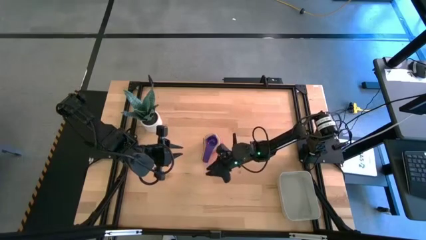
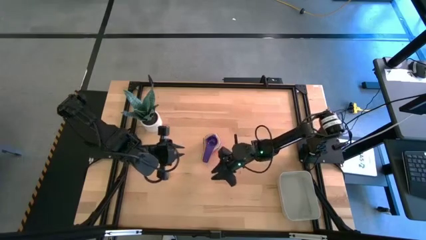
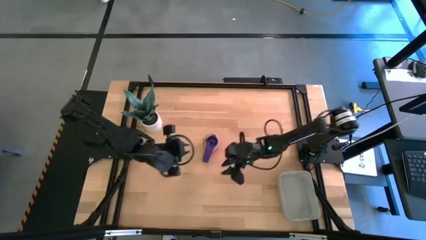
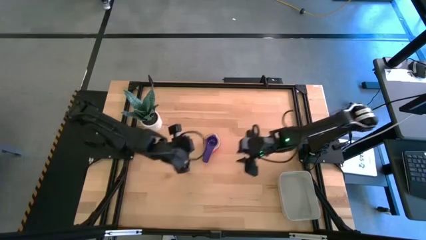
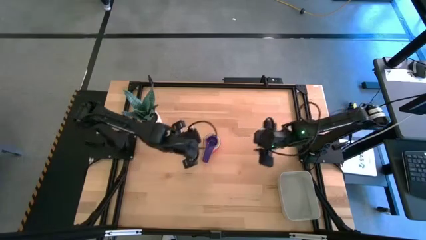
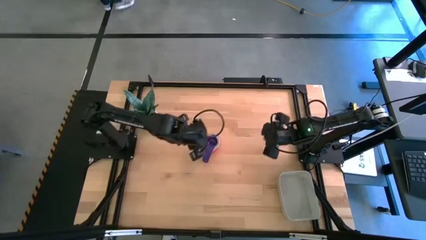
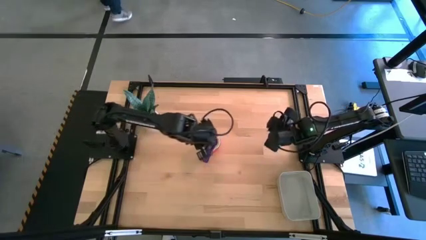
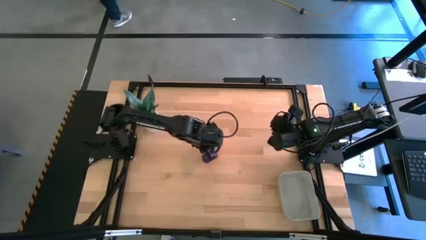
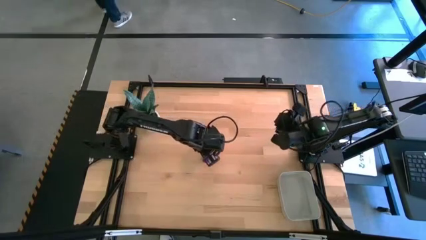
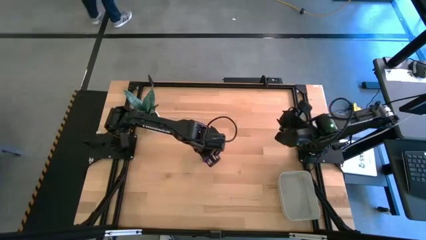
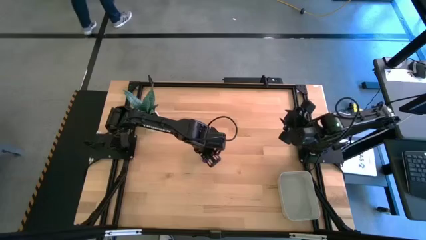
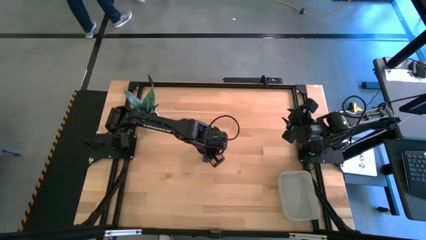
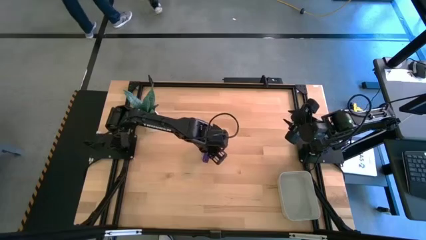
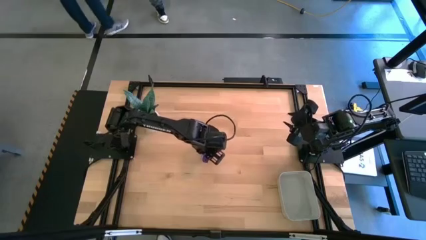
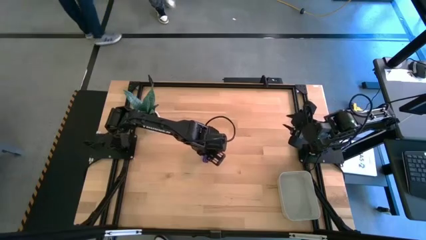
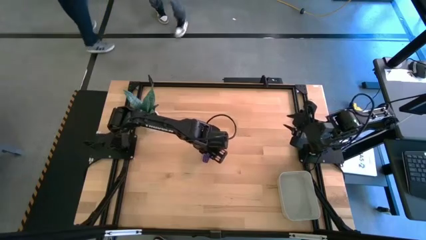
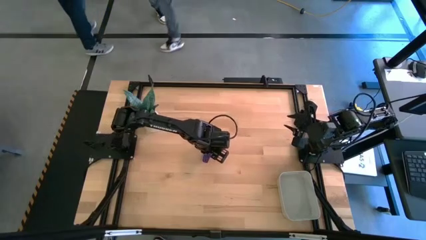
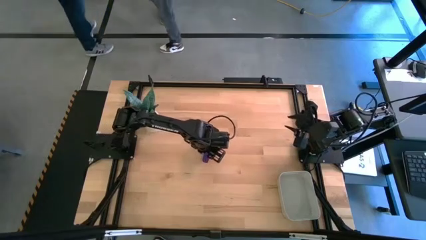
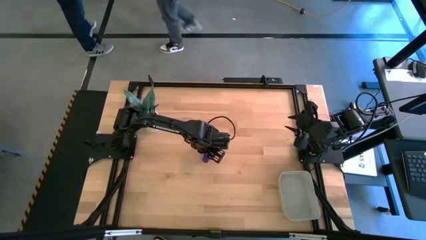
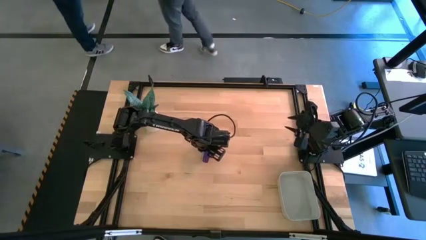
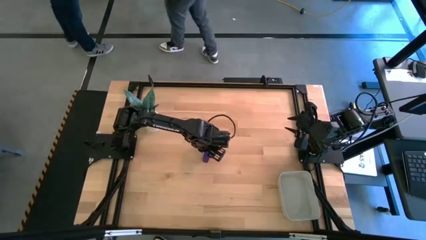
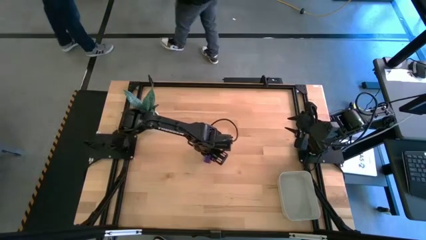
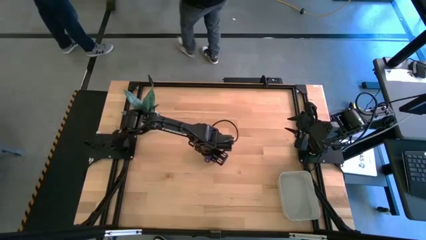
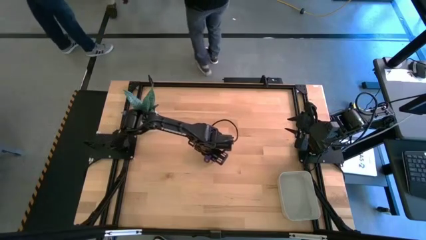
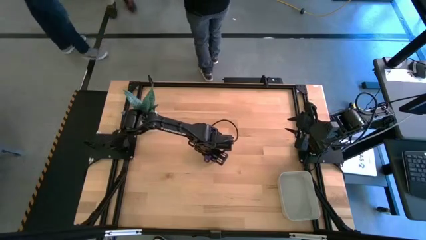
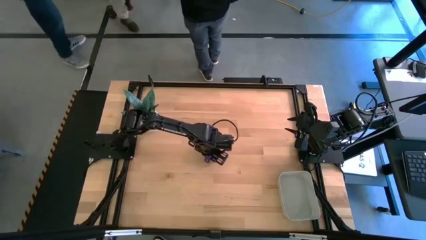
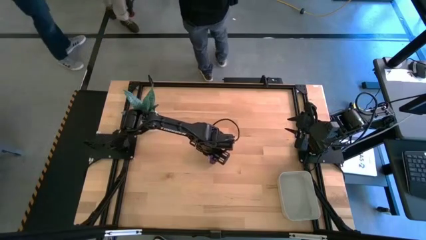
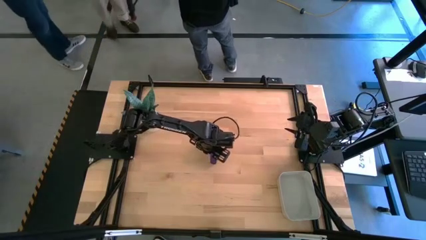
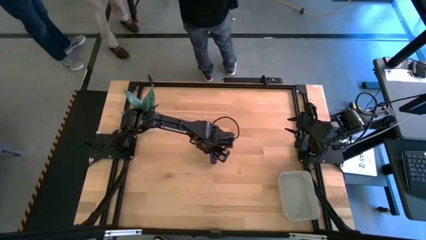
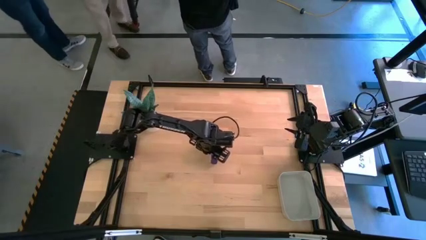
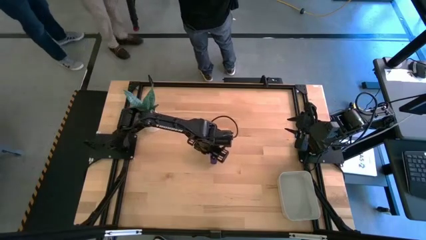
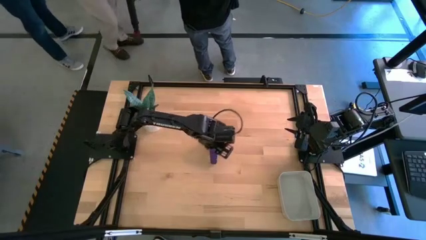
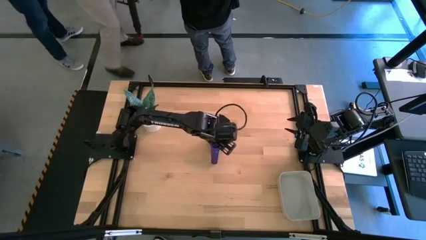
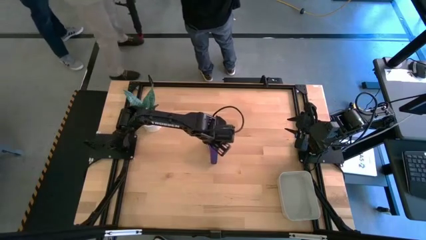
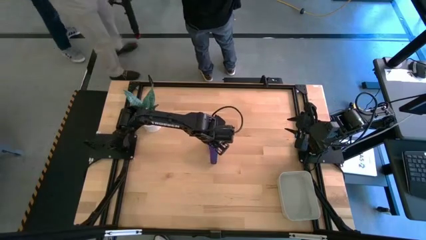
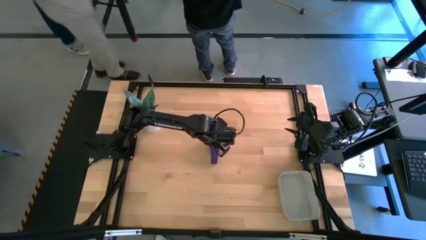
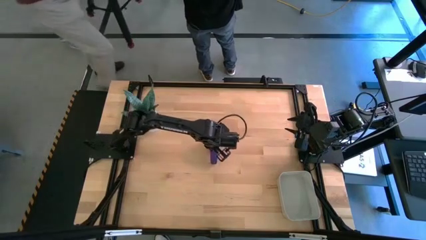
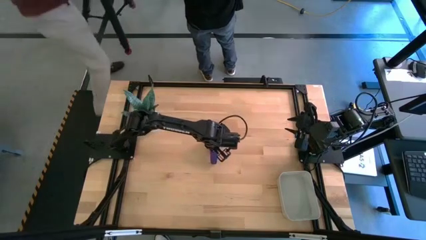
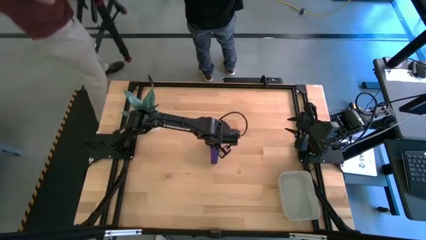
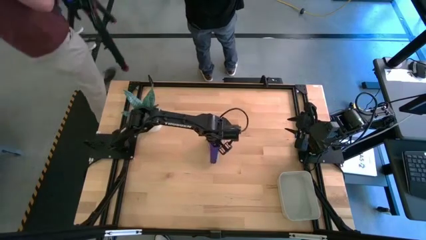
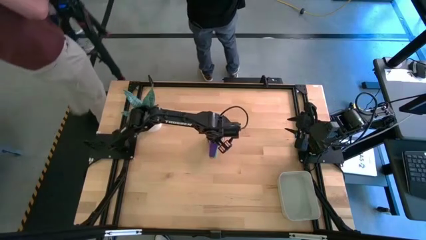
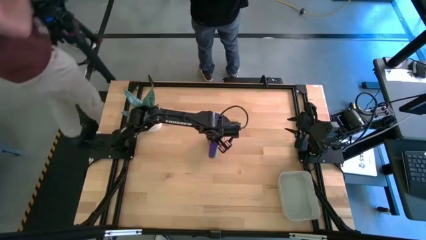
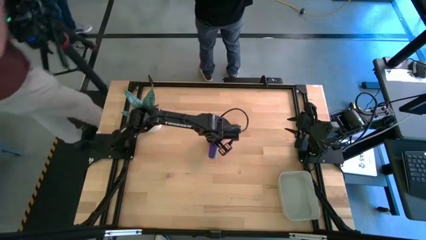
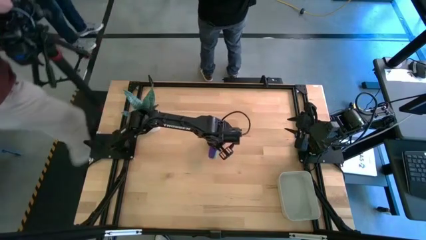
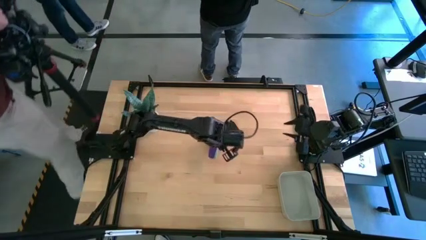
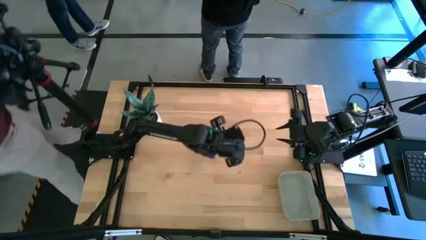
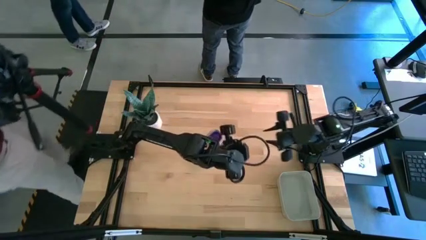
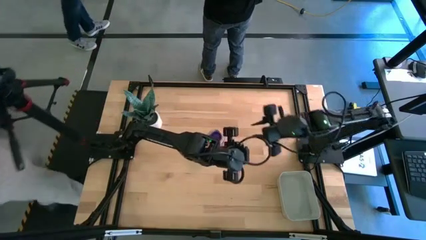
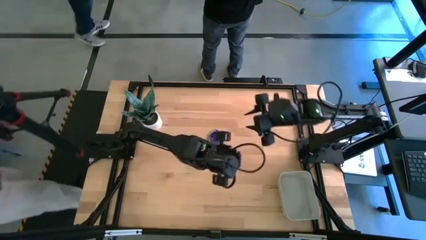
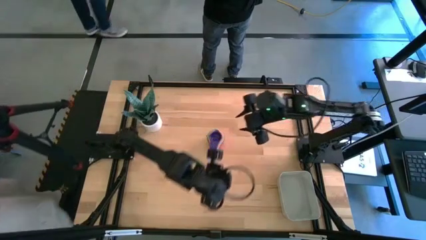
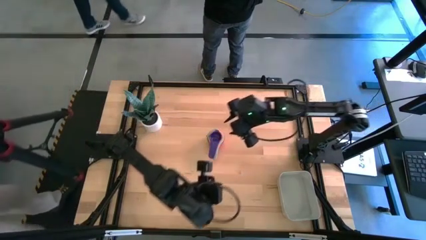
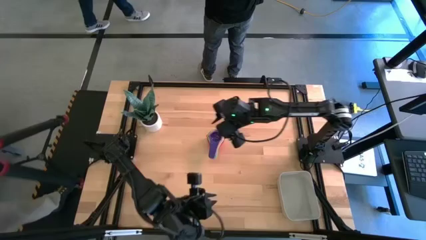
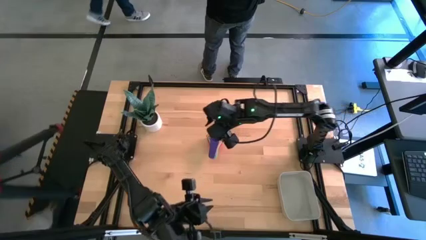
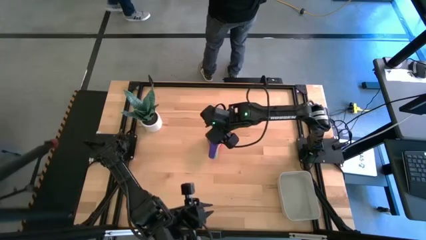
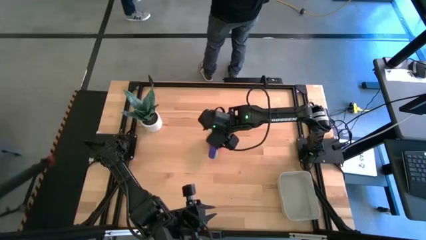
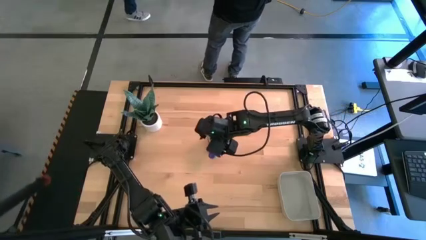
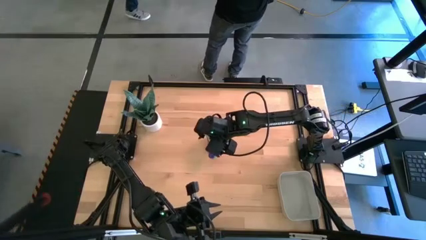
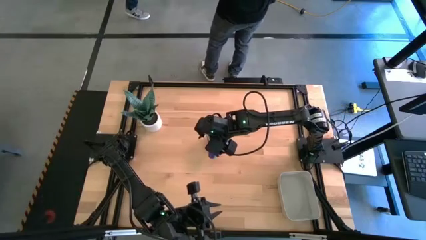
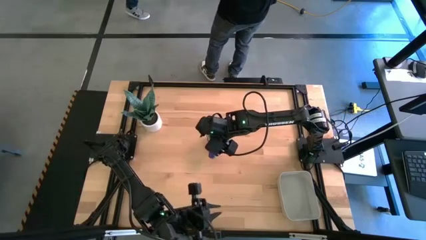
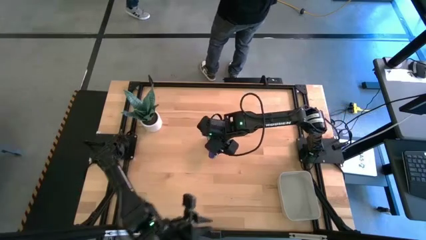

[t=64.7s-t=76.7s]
Task: Nest measuring cups in basket
Put the stacked colored measuring cups into the gray bin

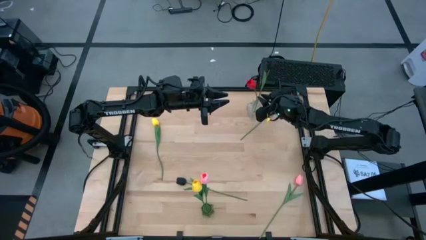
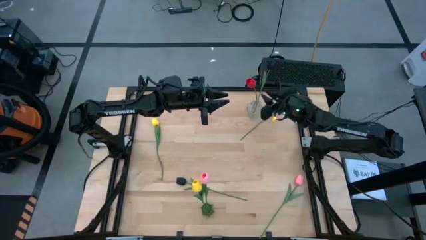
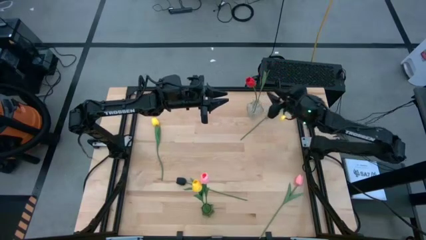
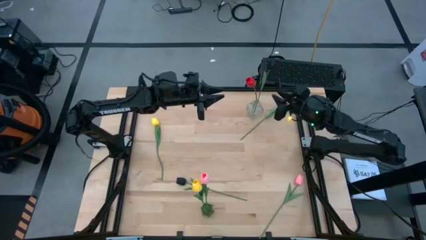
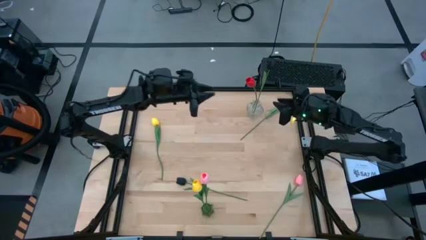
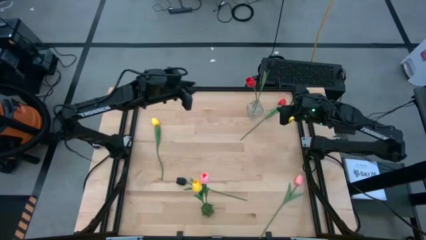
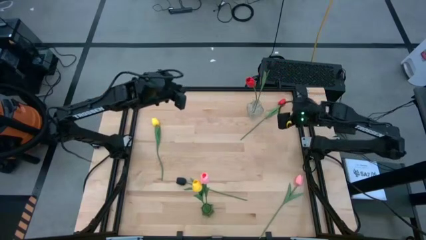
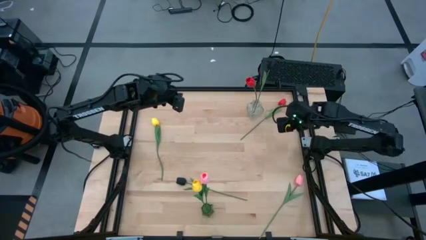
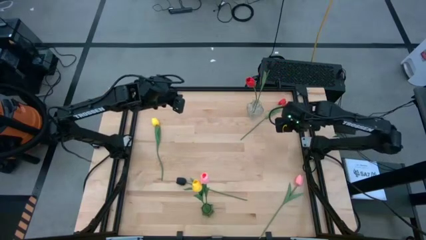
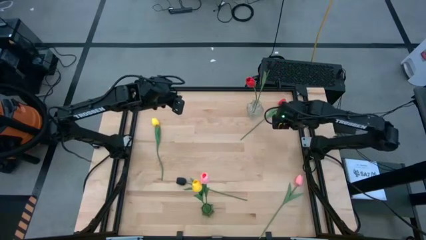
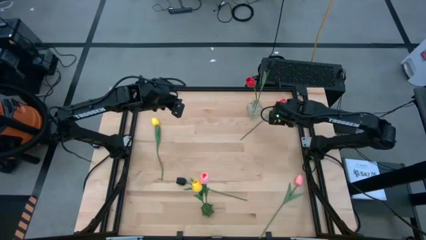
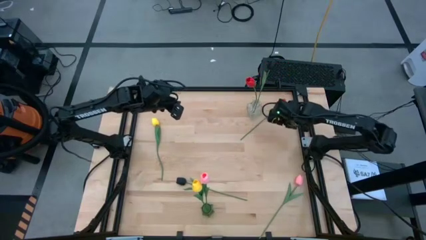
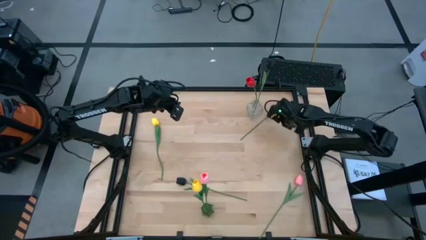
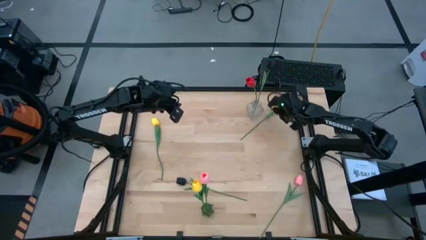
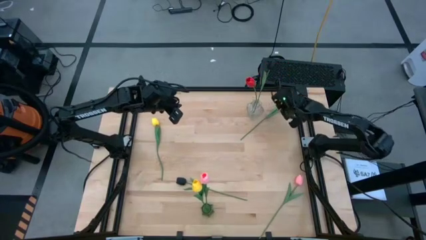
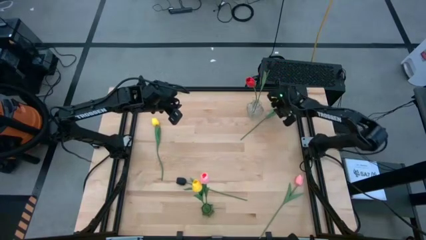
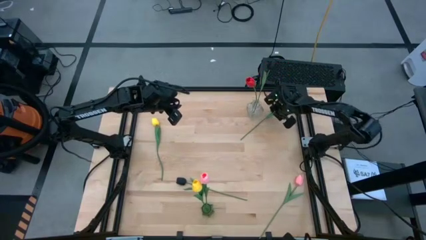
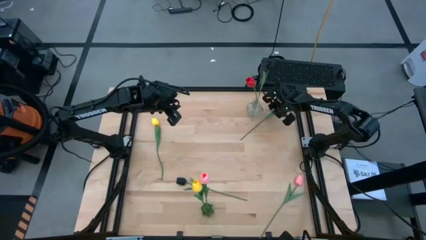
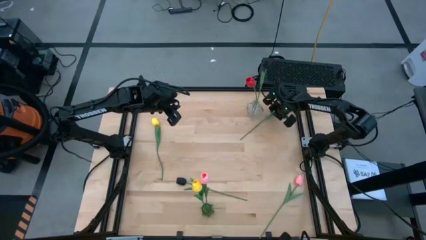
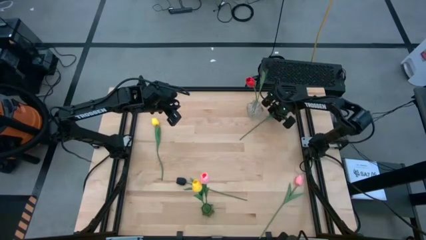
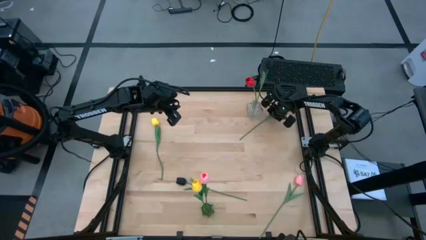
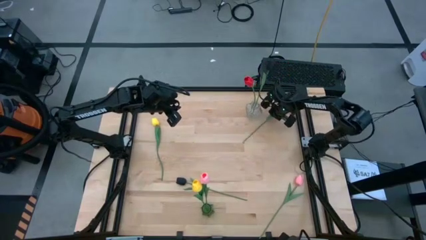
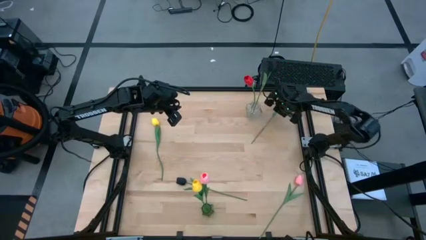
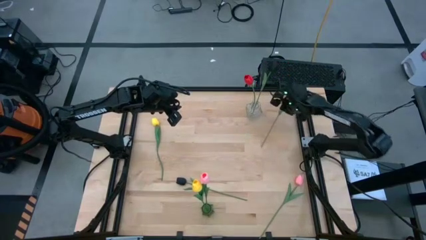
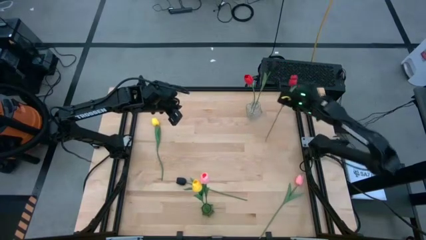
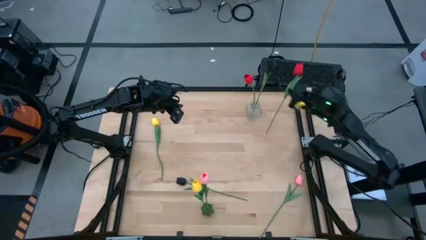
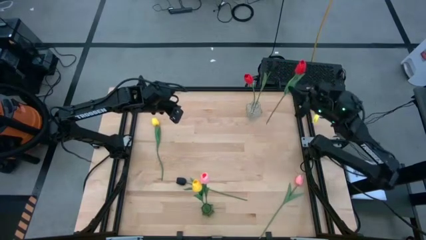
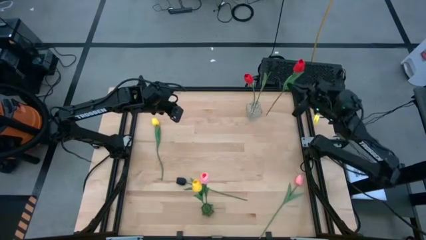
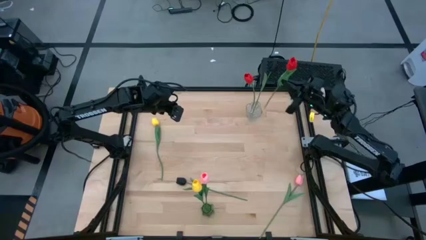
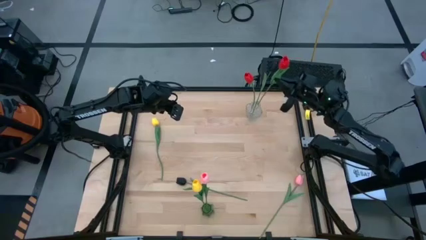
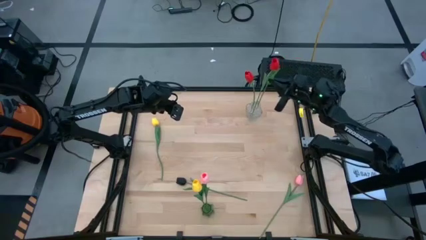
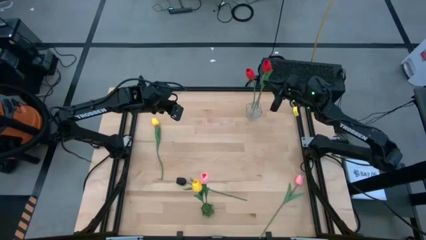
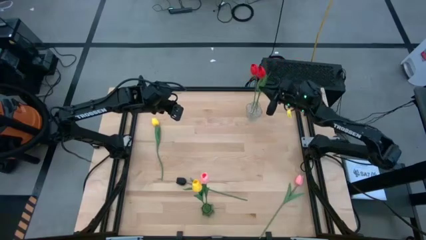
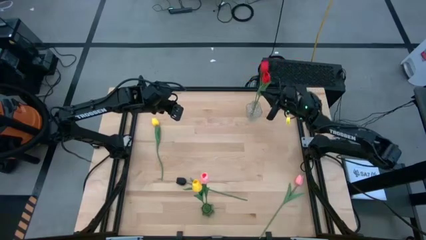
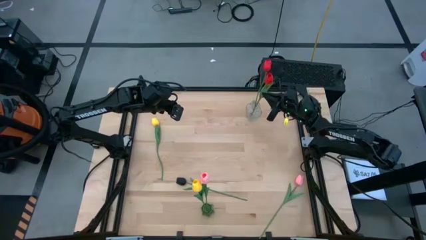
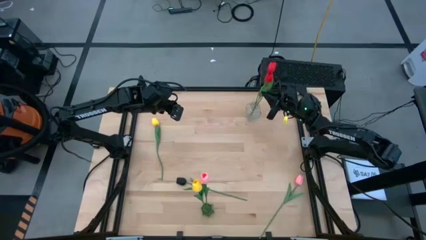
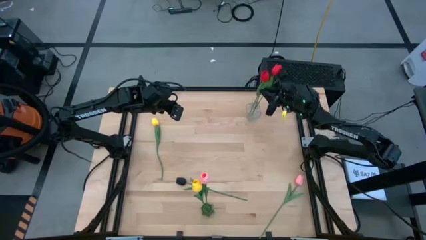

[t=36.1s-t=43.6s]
Task: Sort flowers into vase by color
Put the red flower into the transparent vase
